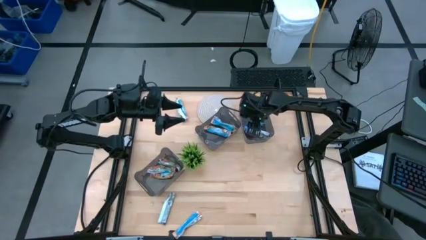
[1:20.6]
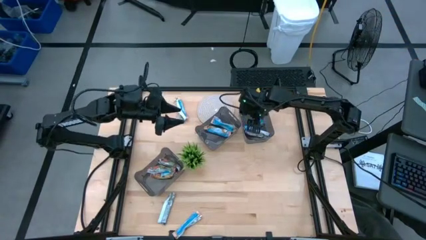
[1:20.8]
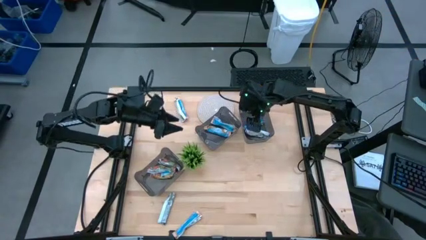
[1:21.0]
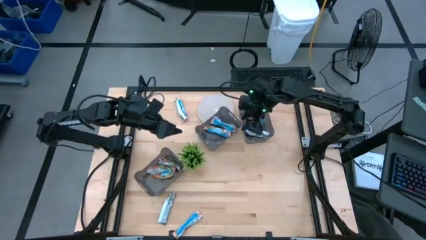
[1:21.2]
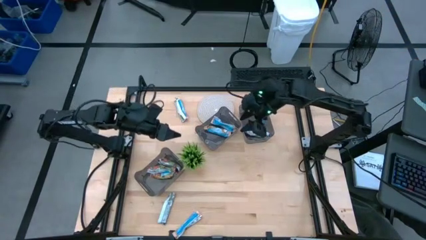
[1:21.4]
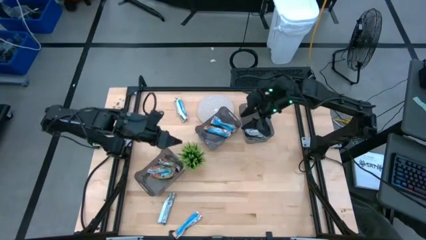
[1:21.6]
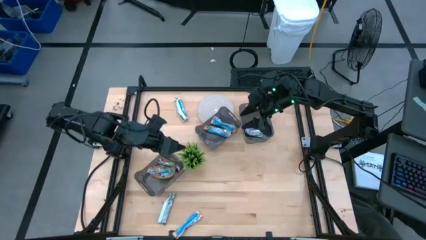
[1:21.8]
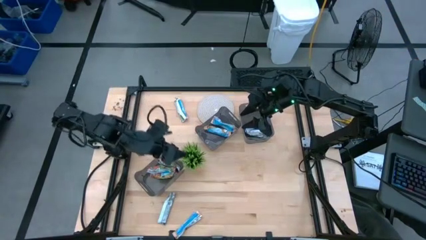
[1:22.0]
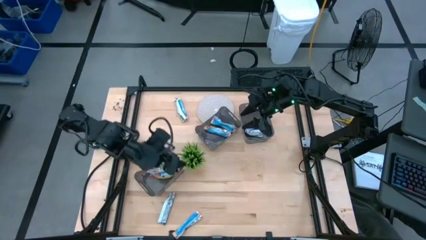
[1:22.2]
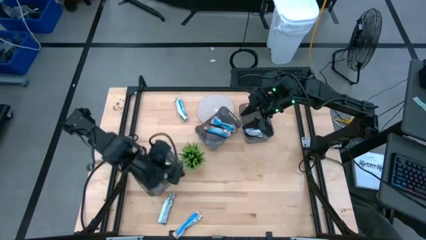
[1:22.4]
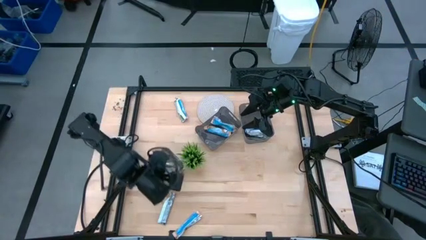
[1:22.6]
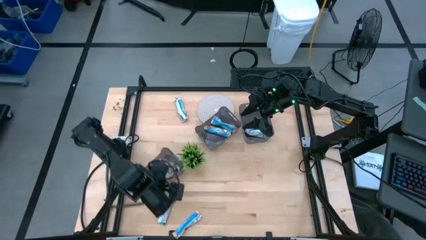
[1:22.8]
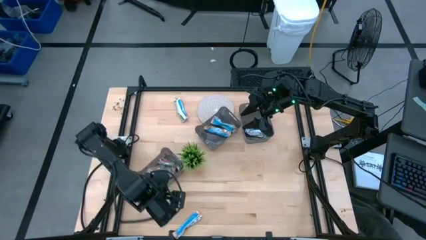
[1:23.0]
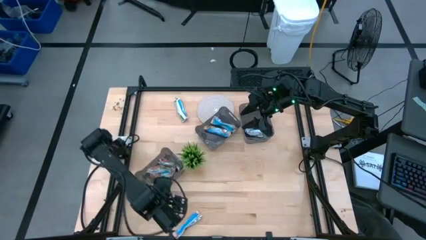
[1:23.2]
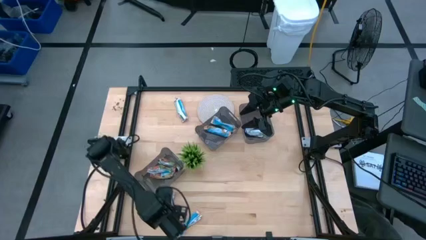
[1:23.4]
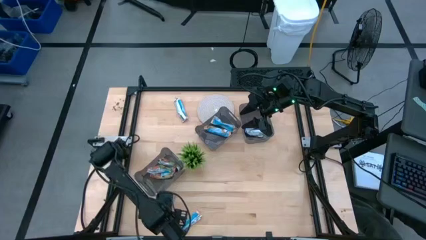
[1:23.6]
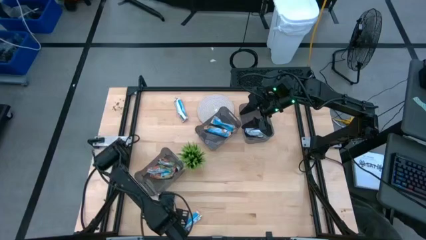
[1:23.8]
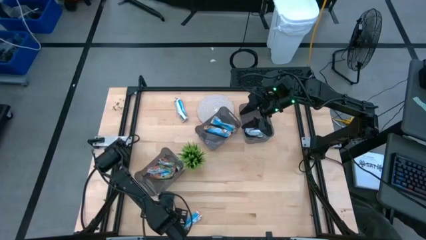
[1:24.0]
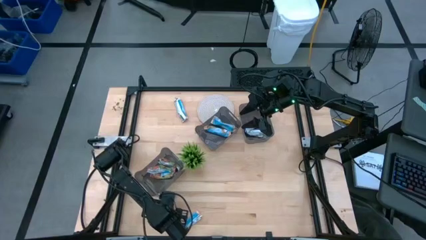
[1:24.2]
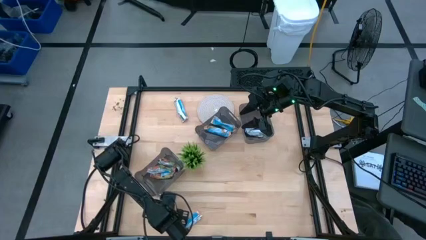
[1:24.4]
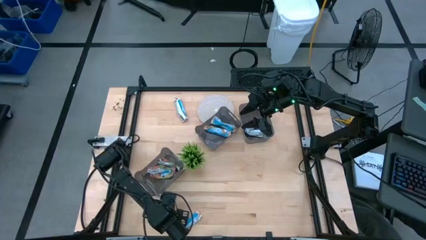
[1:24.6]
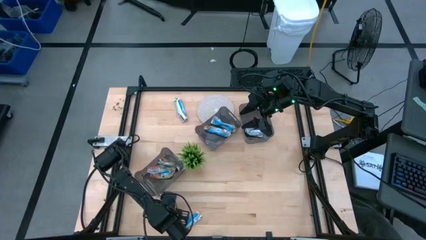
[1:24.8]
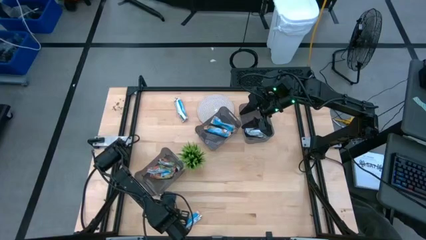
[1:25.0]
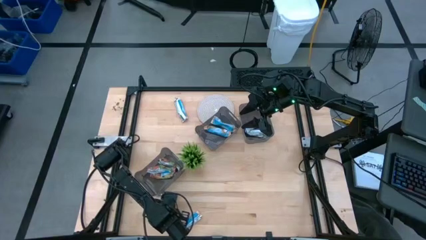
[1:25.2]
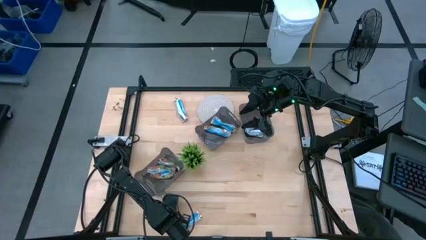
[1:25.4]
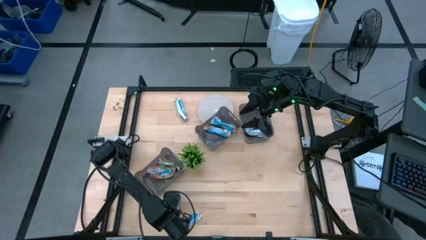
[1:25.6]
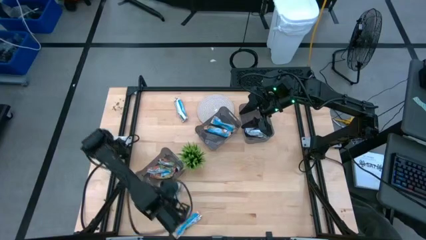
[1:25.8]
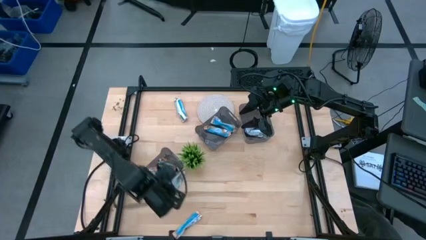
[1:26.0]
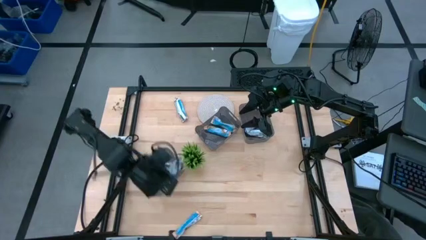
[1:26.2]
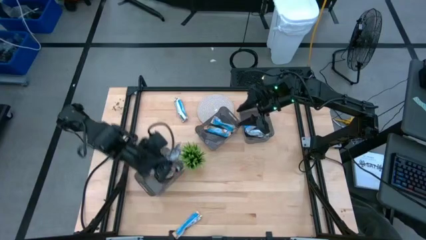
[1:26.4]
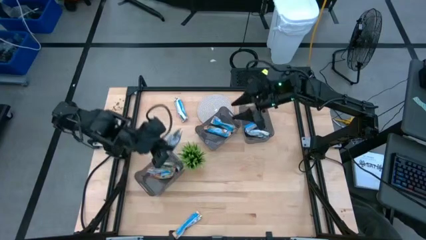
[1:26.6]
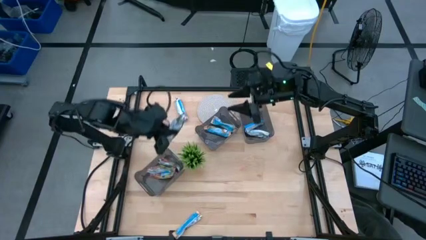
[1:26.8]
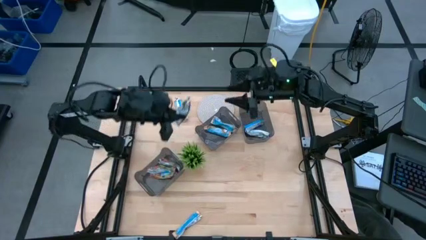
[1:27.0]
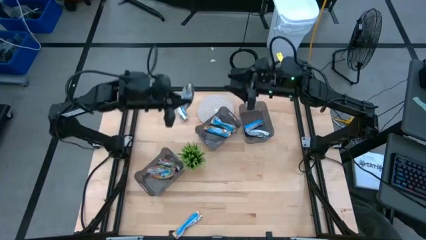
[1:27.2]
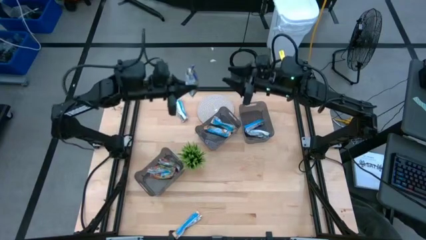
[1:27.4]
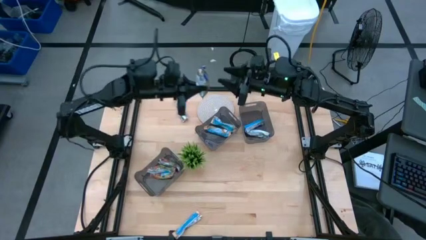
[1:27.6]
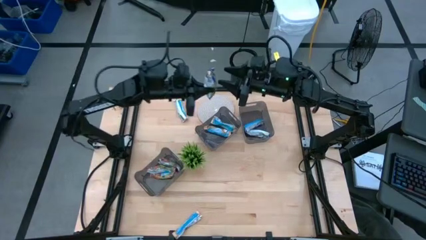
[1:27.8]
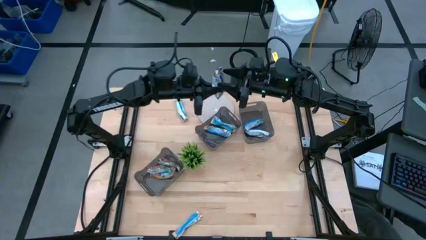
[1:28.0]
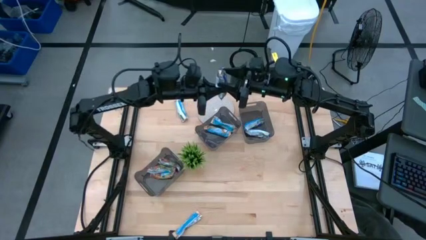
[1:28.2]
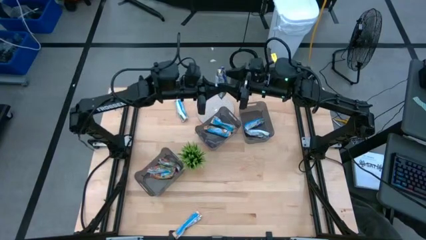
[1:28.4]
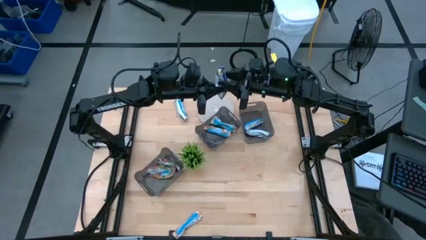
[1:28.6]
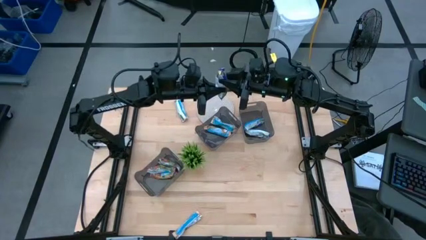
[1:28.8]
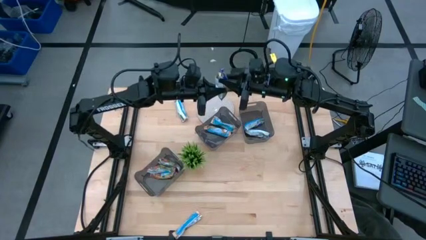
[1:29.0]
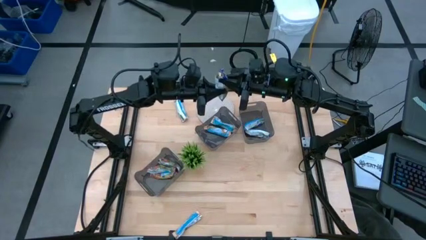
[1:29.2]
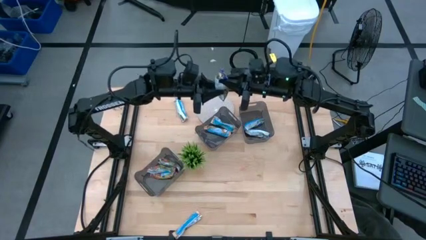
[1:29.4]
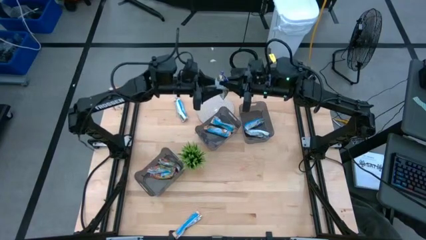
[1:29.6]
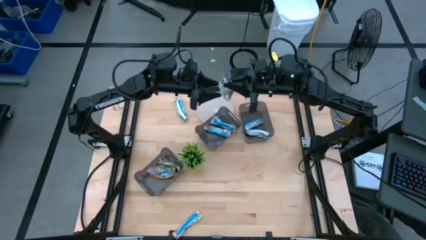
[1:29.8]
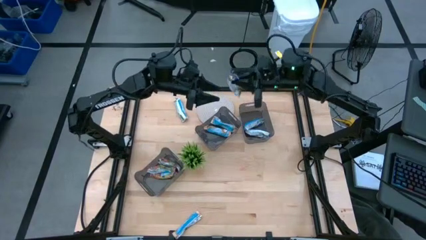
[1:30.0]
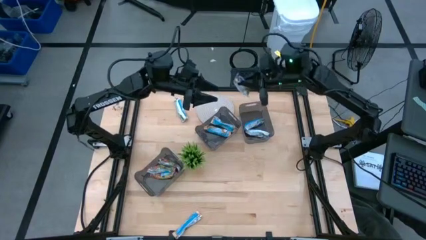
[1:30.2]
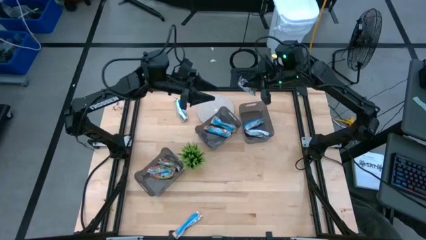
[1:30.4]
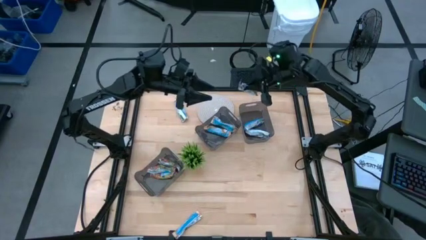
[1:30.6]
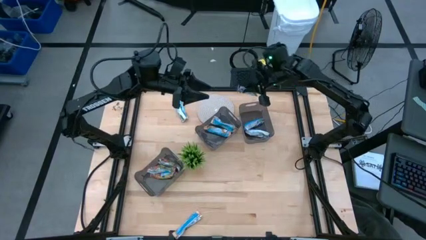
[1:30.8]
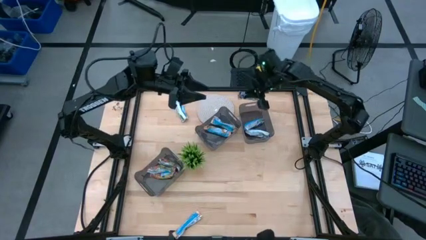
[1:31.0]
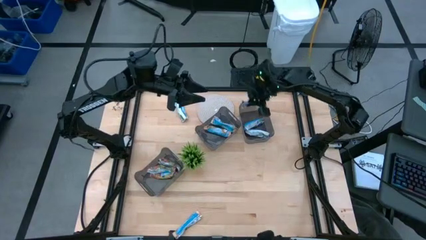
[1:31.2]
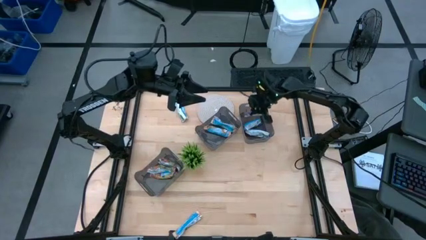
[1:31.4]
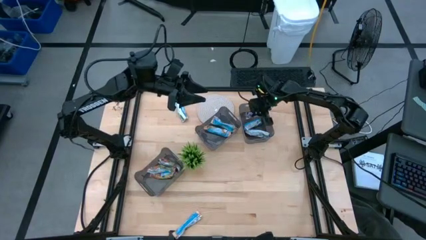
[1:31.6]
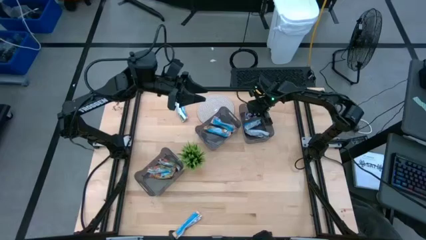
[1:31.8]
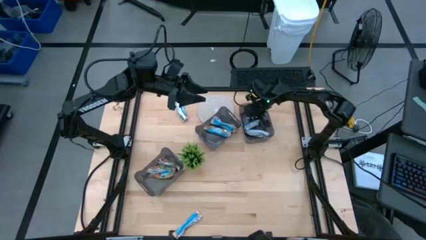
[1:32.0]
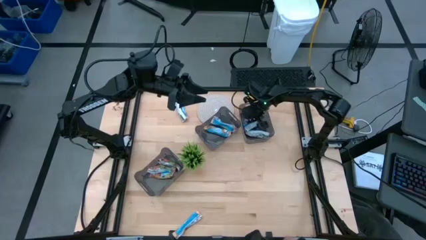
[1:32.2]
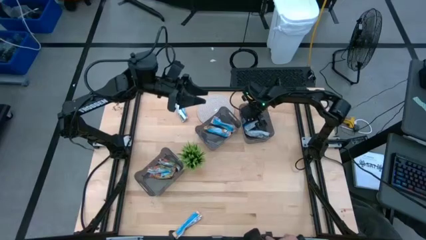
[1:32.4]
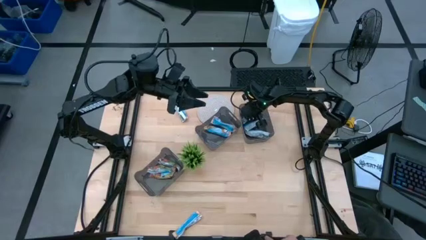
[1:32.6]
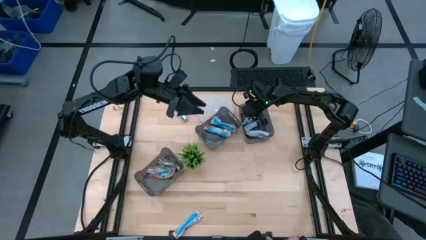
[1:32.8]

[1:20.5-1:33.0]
Task: Pick and place Granola Bars by type
Put the blue granola bar into the top right black bin

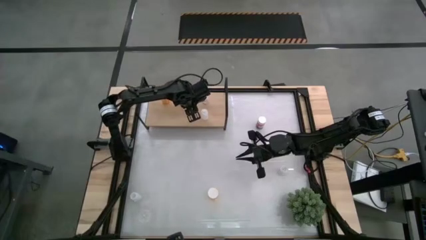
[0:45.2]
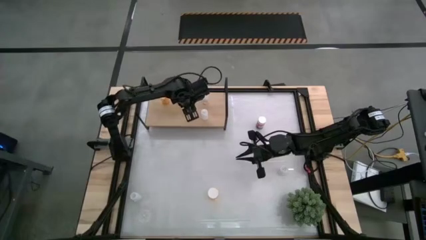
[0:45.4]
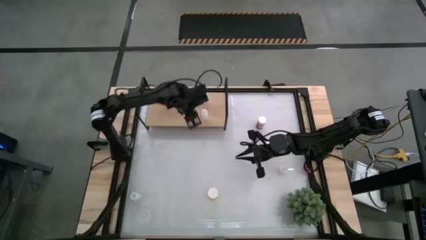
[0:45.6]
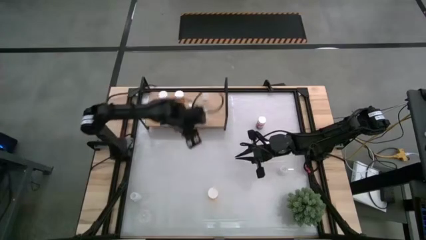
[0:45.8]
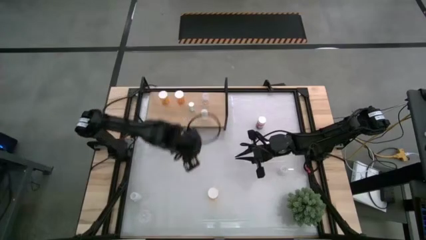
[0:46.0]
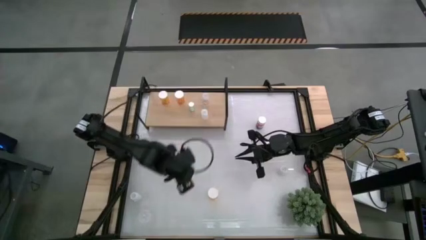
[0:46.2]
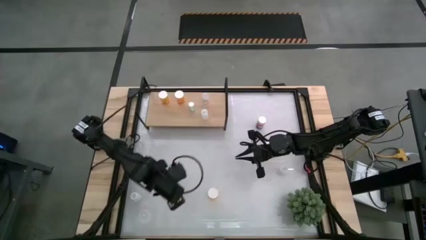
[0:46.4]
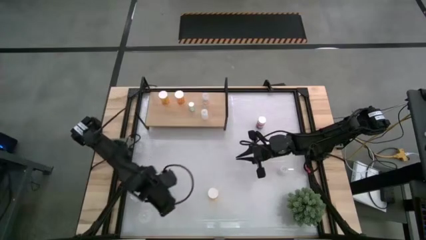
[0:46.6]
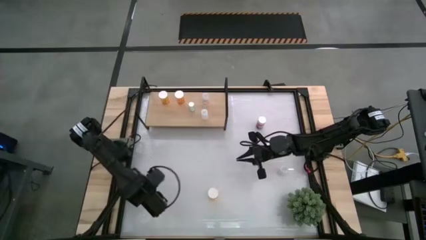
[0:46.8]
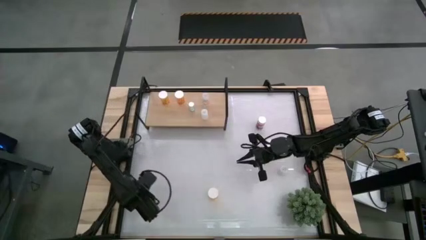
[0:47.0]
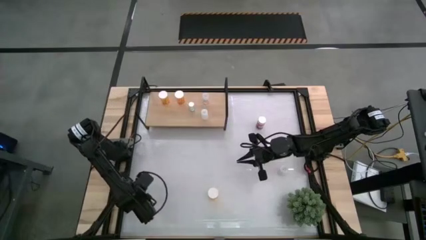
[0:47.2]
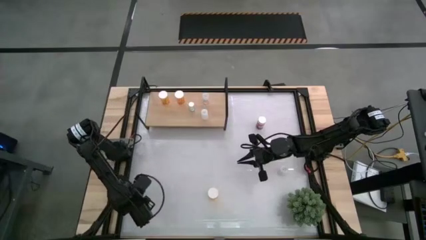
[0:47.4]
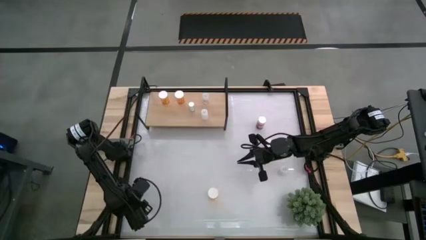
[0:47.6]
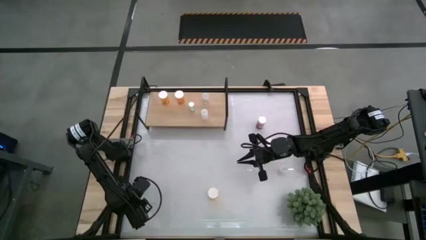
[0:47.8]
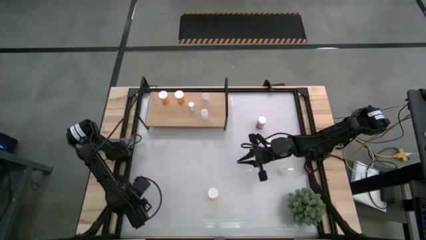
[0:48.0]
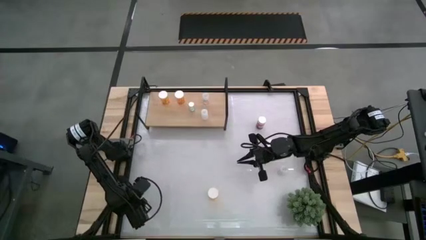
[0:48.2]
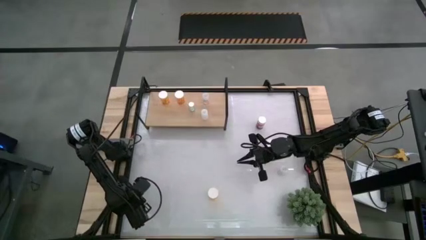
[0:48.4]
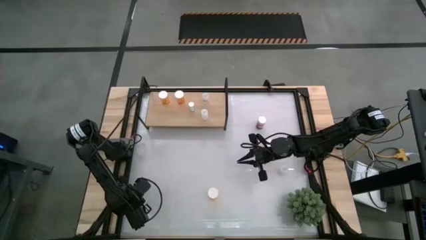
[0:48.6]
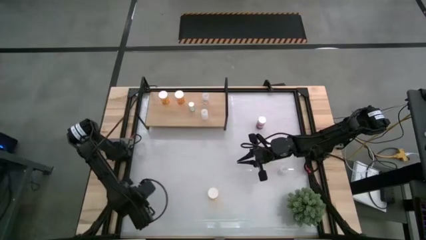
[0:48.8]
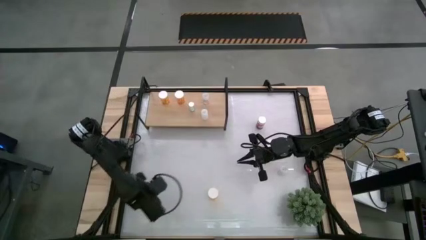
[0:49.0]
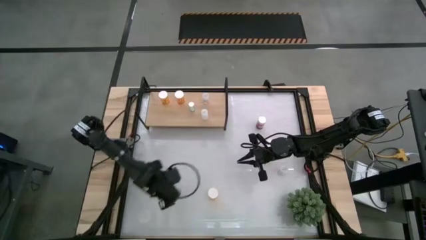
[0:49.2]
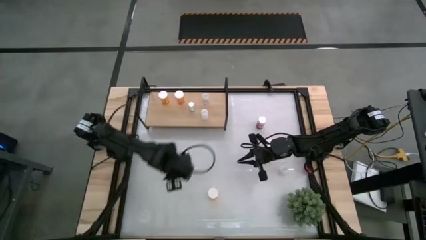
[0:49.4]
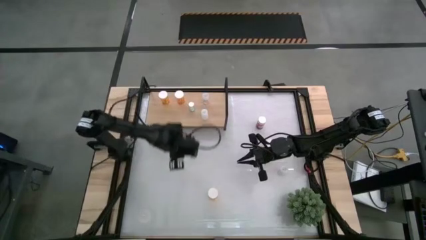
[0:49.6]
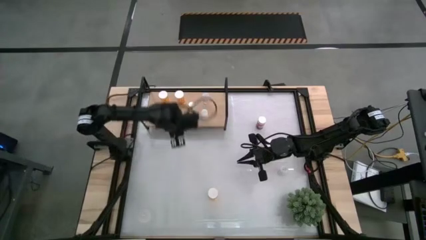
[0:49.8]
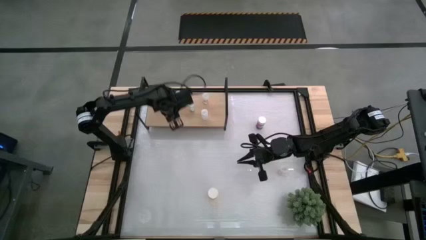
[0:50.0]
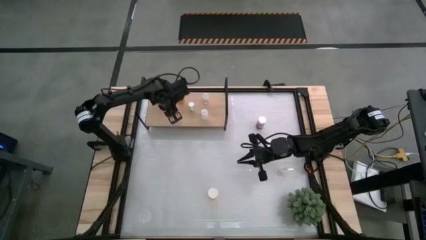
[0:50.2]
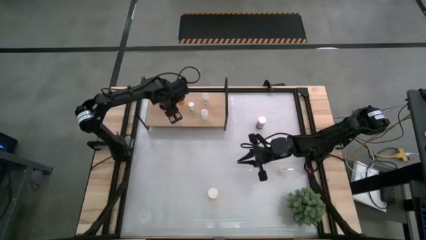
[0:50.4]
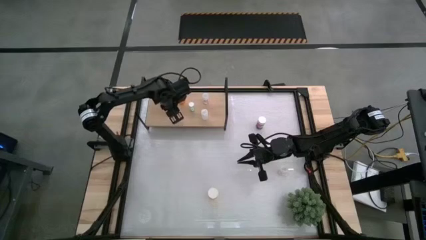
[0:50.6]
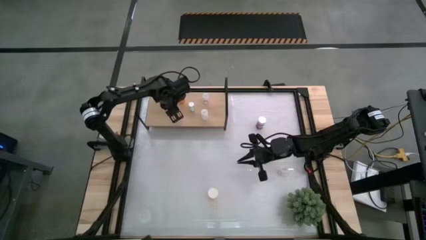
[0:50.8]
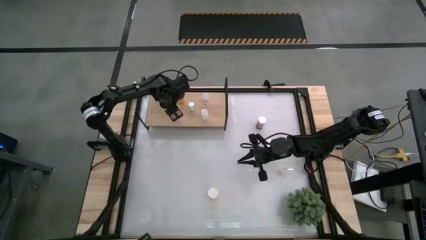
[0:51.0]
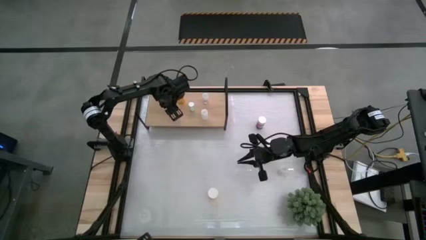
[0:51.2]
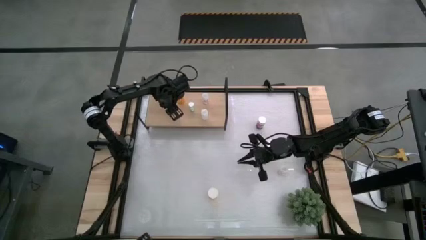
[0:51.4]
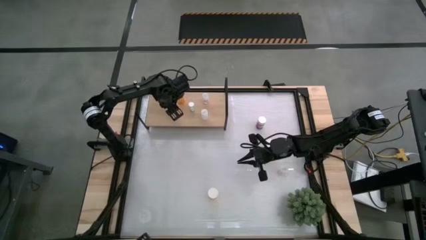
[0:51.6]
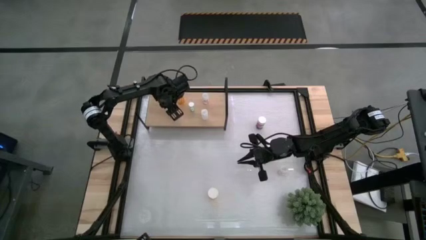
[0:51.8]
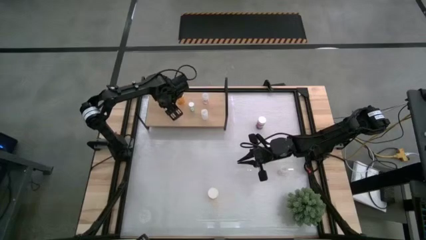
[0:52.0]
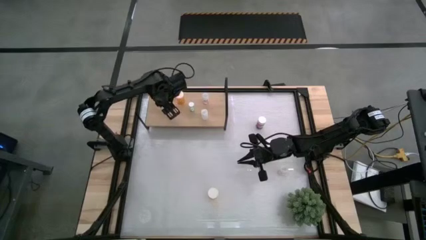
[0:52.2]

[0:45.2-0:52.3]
Task: Pick and place medicine bottles onto shelf by color
Put the small transparent pill bottle on the shelf
